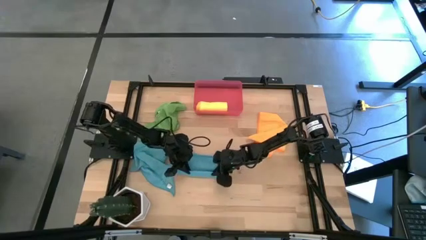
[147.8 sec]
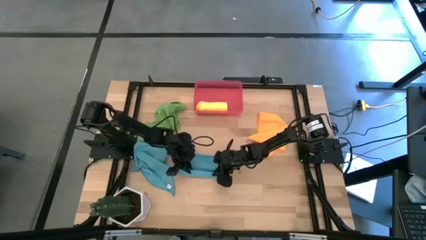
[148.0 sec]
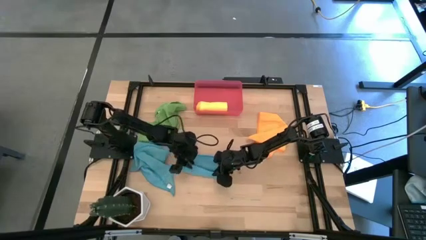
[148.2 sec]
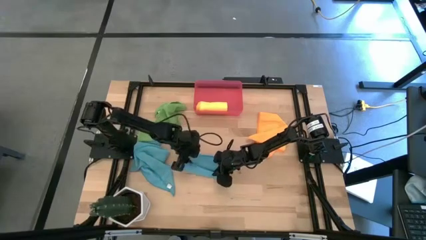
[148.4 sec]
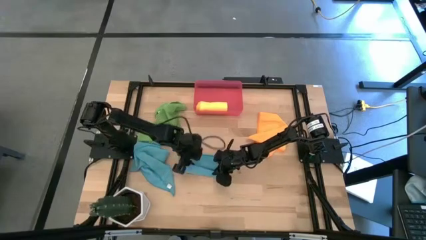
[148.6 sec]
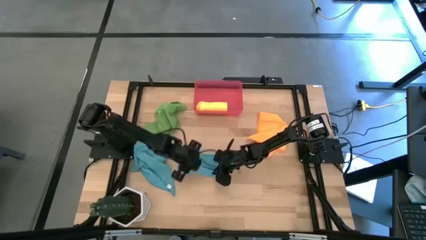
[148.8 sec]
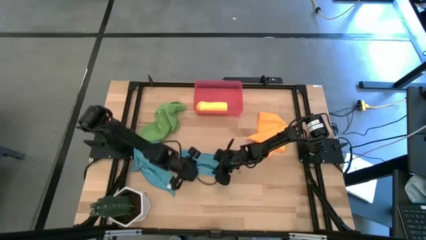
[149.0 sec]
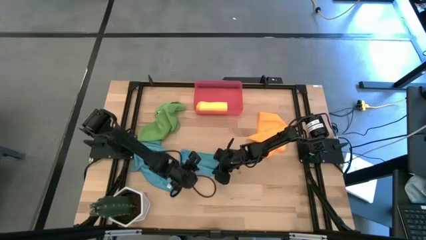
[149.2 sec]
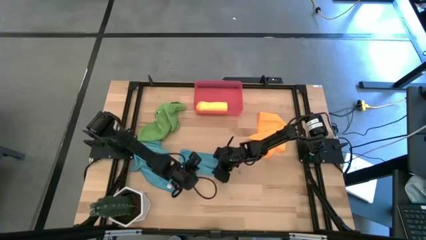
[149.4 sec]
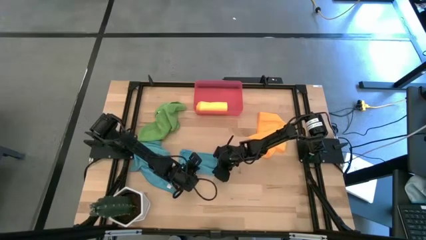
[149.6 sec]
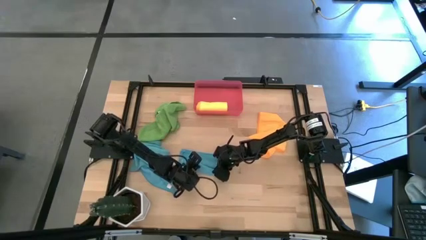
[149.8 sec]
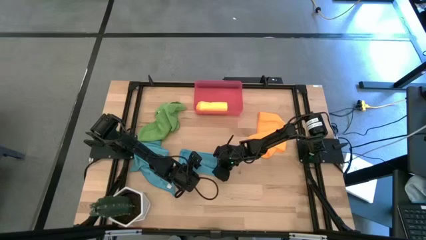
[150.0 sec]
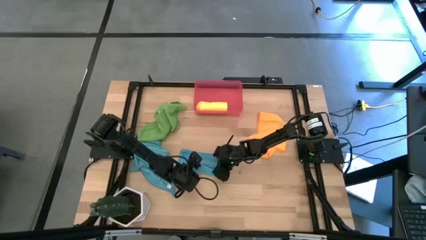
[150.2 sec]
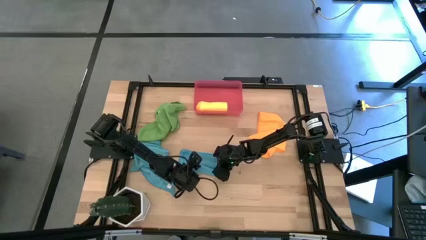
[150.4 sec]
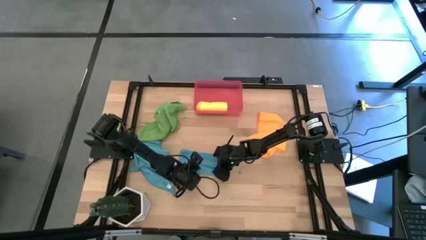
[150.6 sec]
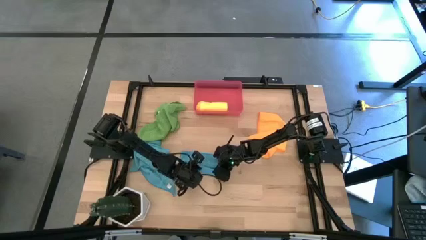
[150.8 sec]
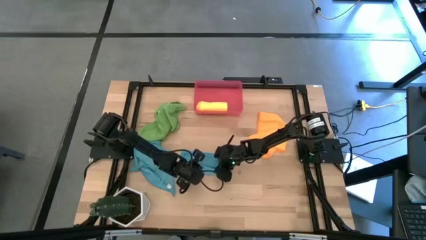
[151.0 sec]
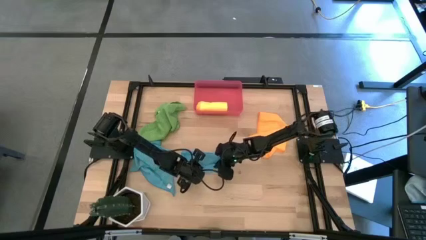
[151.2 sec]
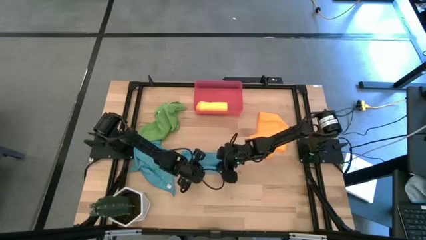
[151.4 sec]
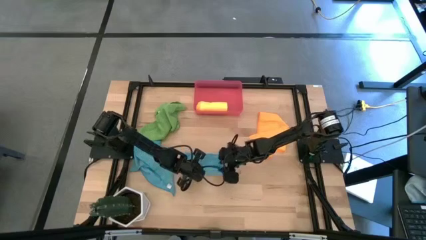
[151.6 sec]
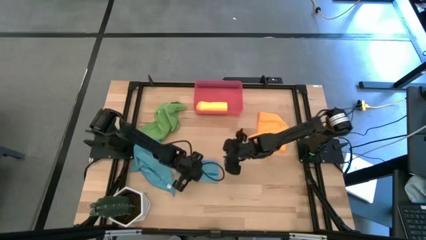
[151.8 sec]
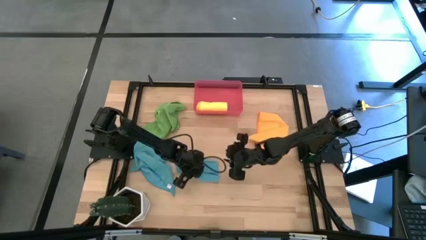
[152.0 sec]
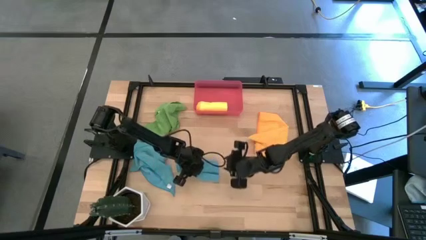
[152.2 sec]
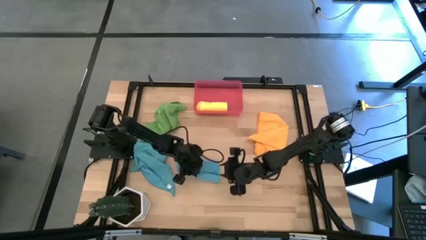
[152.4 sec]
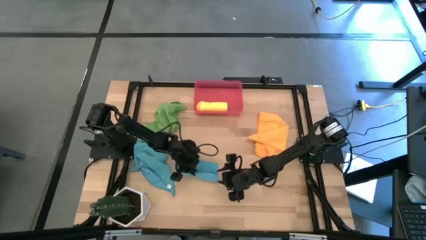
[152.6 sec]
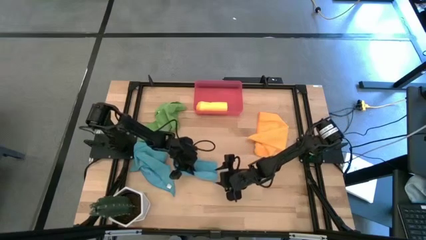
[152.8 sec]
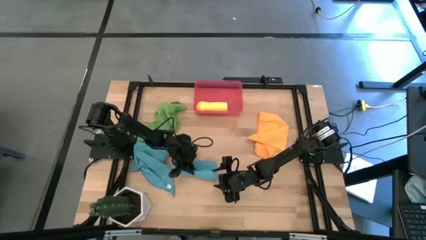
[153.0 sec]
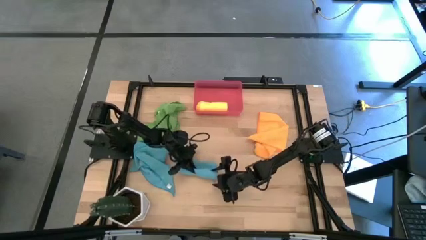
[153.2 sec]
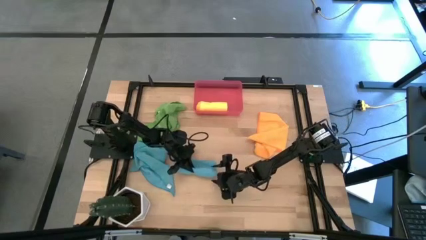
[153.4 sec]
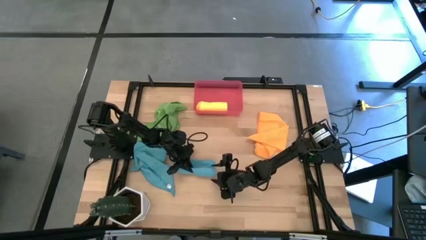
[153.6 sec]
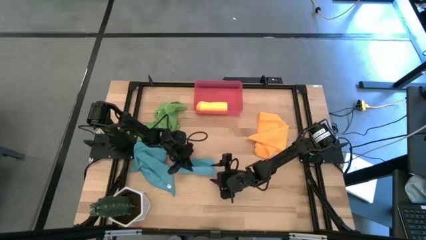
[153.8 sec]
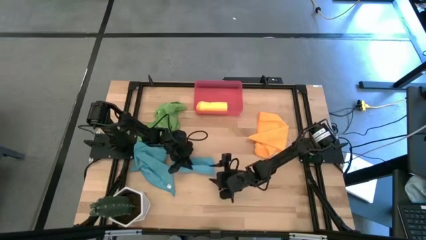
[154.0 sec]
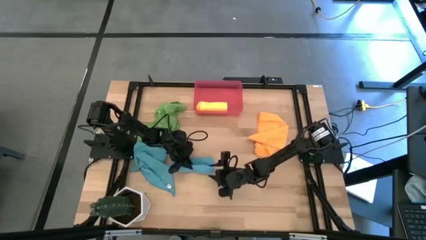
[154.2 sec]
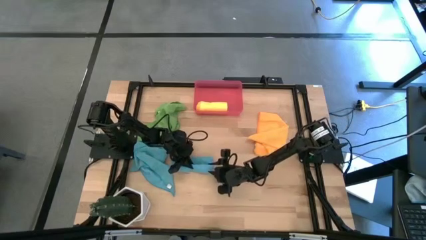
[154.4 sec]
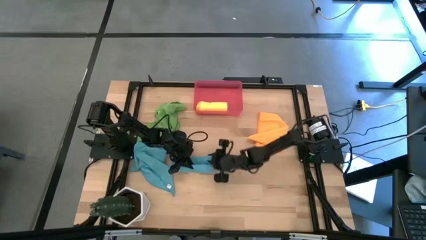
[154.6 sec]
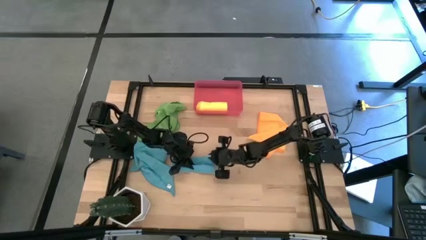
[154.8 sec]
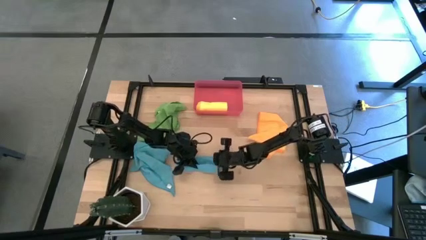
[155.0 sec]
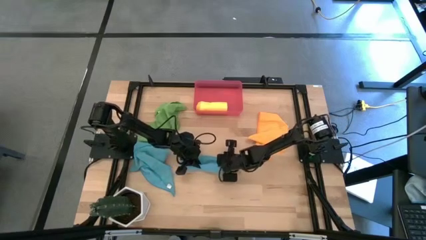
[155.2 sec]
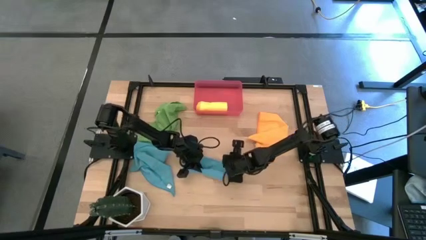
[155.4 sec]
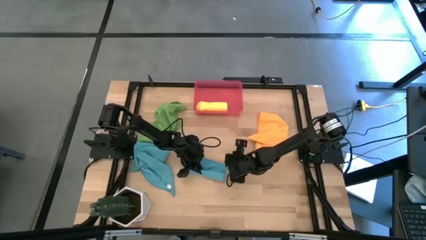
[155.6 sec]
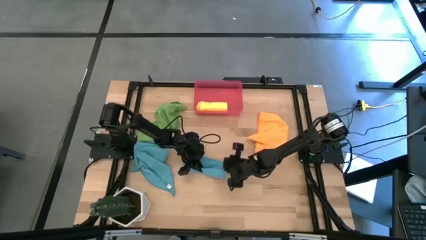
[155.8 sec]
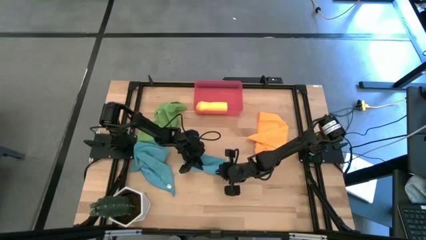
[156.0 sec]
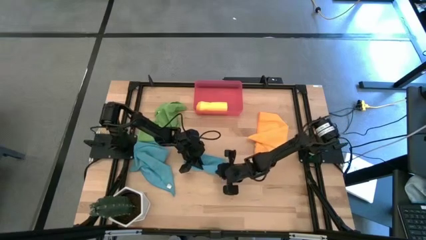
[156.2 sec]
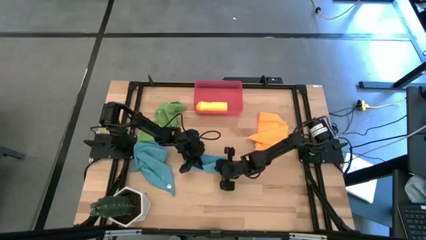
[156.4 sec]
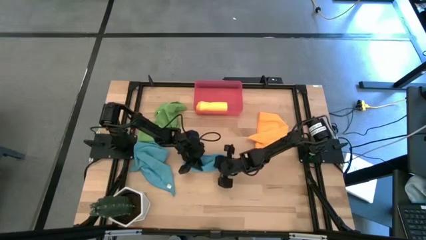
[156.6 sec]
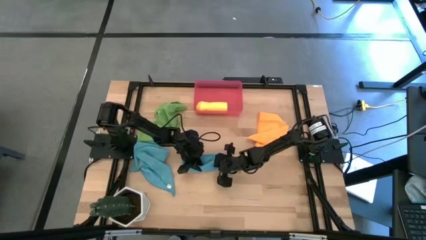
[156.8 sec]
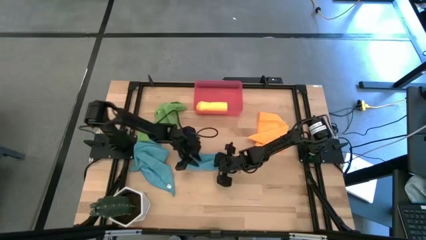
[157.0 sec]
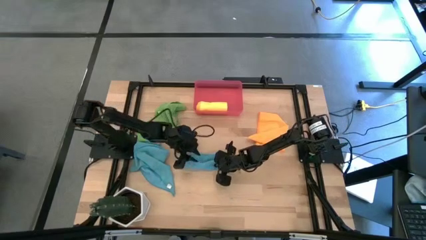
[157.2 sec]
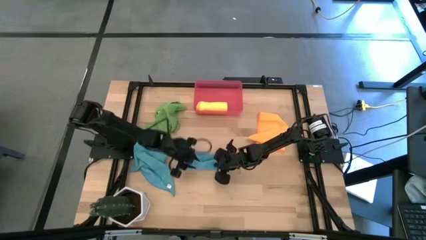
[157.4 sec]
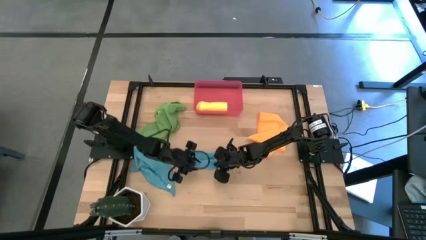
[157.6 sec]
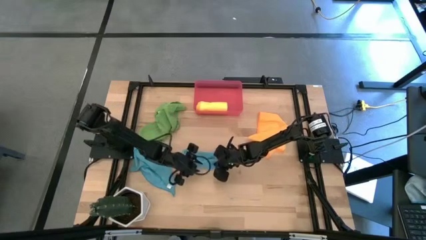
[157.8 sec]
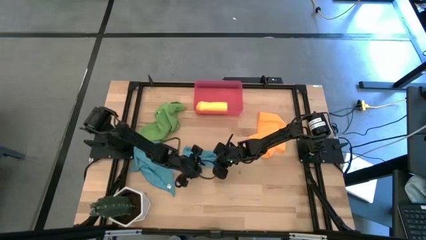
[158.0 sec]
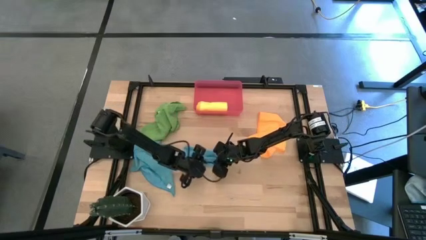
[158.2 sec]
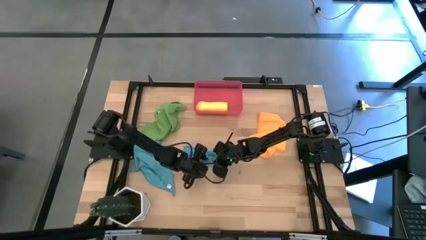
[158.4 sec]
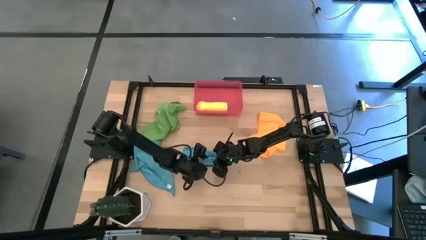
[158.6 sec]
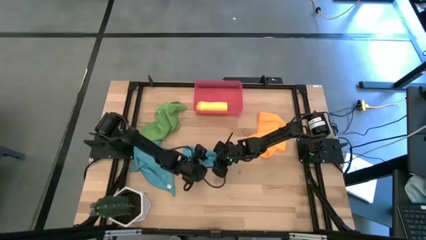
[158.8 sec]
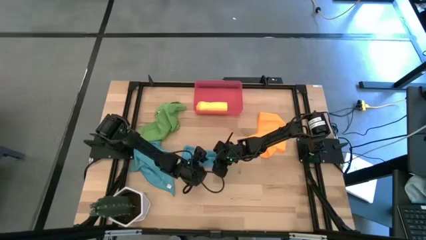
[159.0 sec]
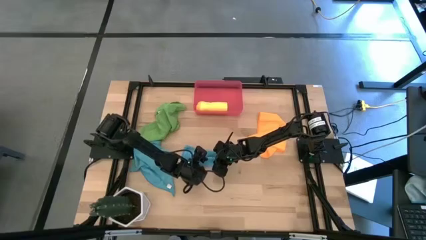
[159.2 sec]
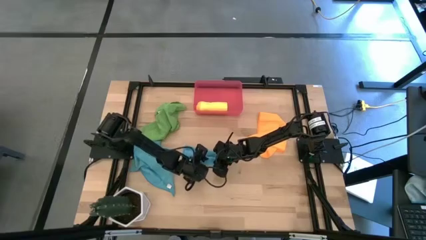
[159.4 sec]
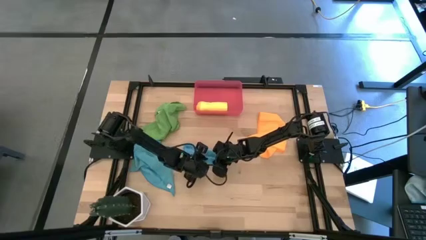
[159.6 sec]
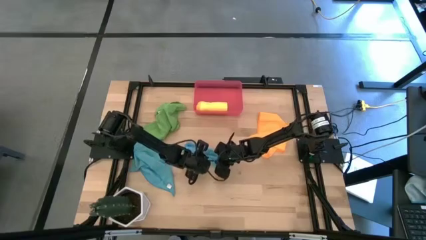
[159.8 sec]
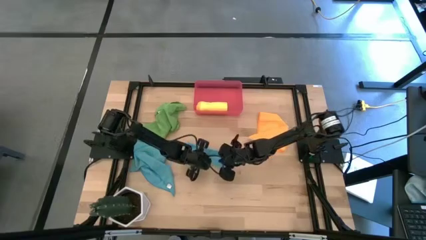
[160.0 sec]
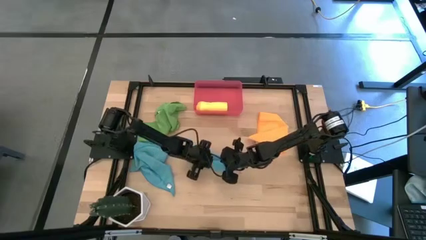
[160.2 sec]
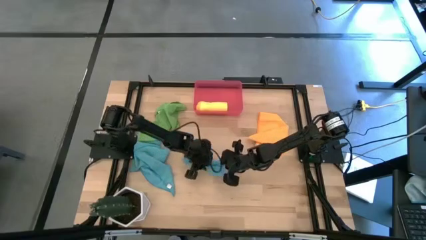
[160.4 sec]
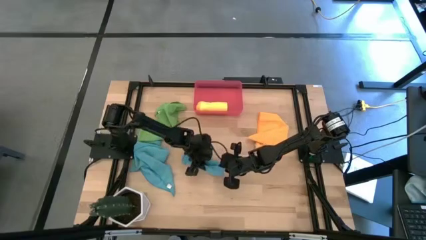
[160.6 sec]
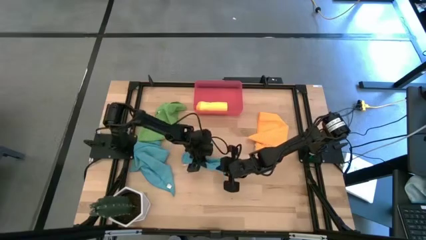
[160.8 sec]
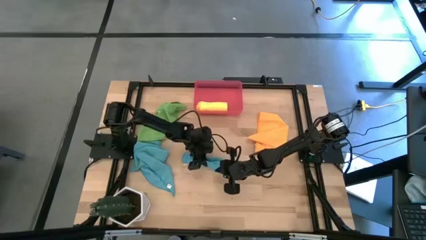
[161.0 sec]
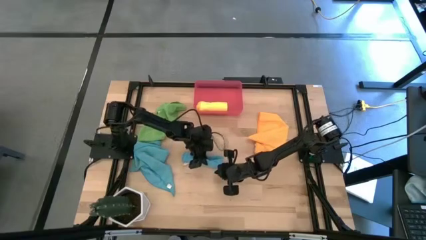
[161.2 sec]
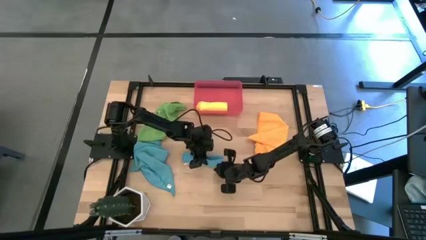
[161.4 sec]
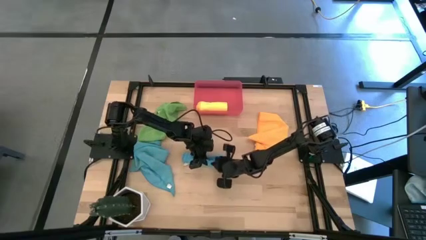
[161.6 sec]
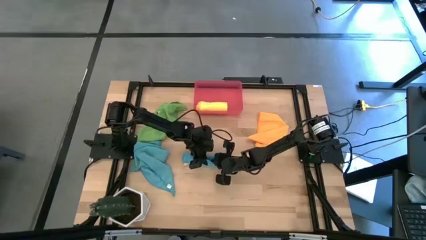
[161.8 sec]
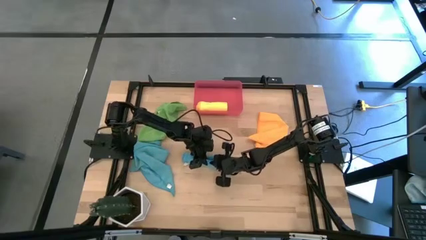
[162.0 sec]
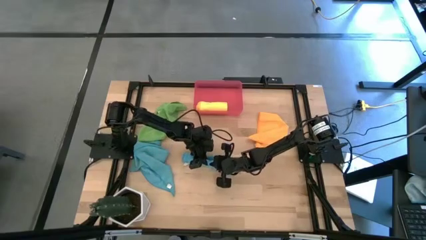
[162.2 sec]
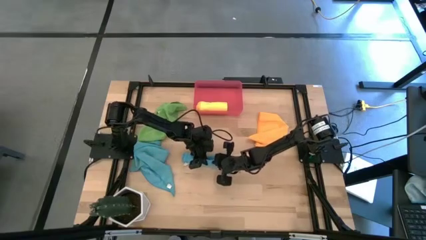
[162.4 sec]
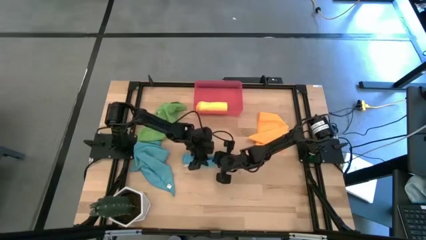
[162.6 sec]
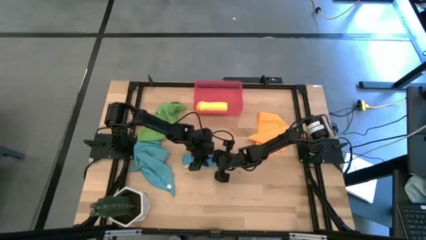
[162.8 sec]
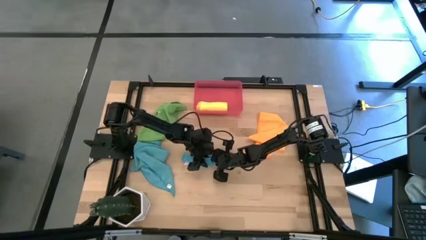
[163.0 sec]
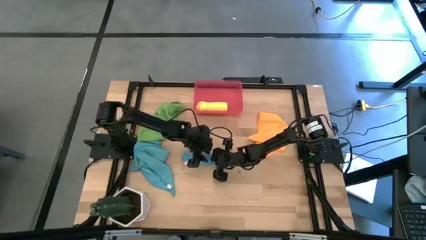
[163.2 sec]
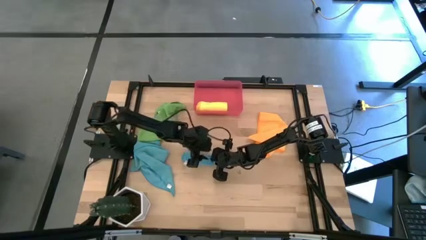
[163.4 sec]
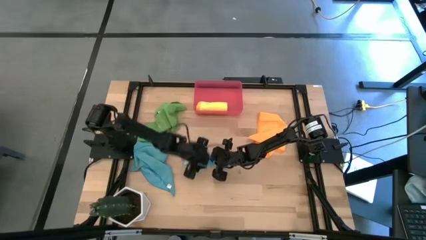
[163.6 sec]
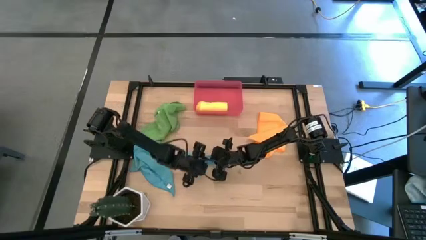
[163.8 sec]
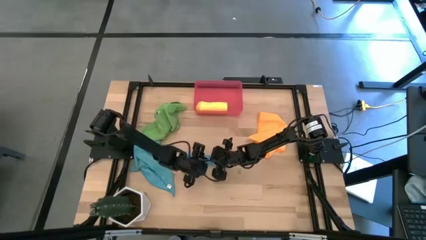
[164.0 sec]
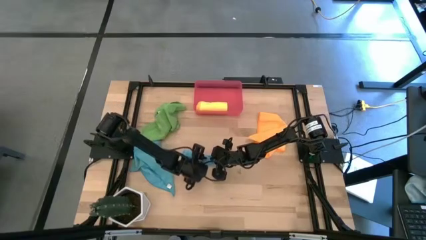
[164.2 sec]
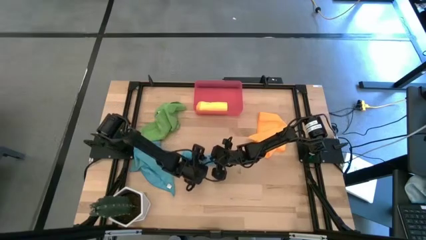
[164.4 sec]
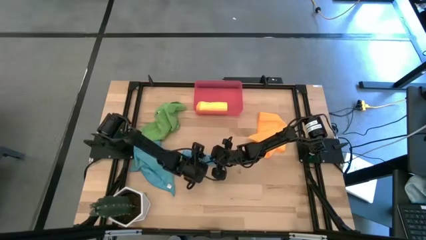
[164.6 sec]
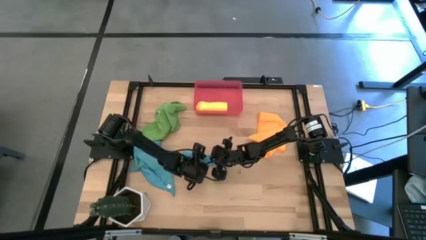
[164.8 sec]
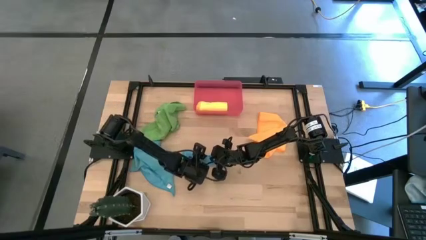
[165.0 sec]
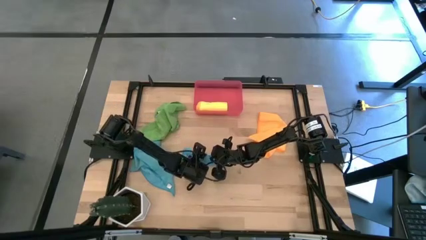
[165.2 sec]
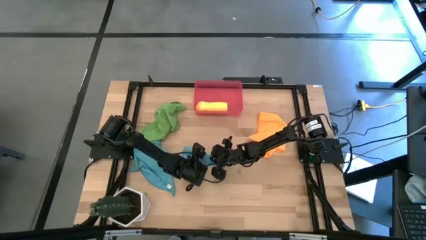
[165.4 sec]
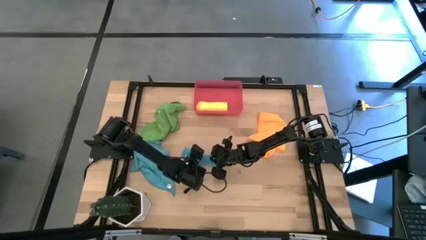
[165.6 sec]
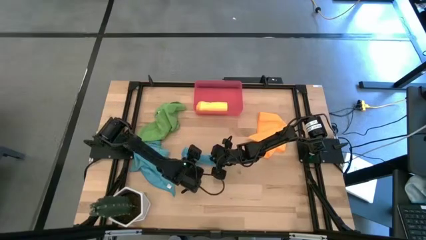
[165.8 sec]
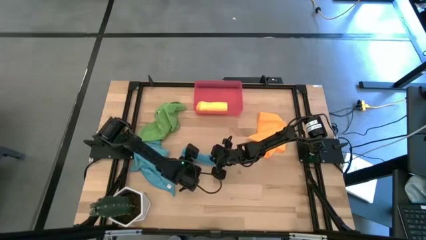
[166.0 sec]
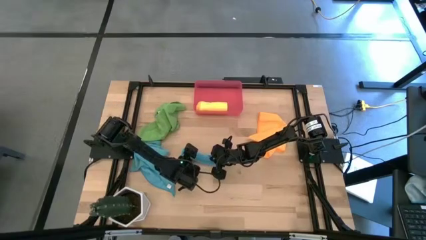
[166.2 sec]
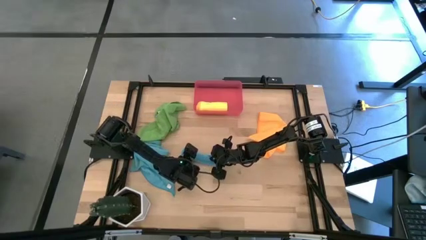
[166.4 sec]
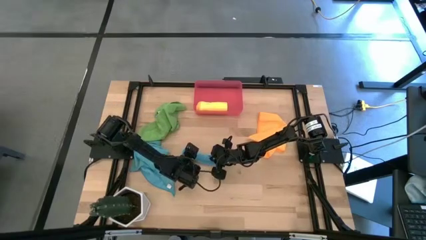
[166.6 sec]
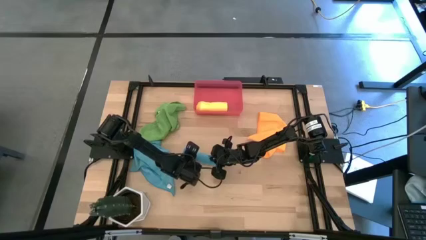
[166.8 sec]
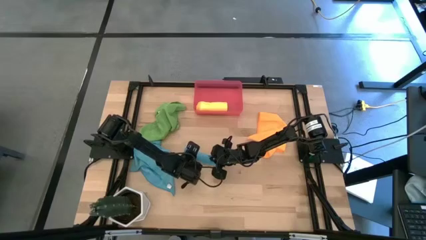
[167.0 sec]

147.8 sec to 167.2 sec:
Task: Roll microfiber towels into tight, uniform cylinder then place into a basket
Roll the left blue microfiber cloth
